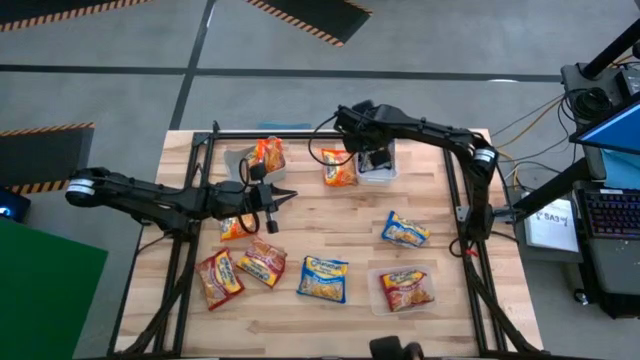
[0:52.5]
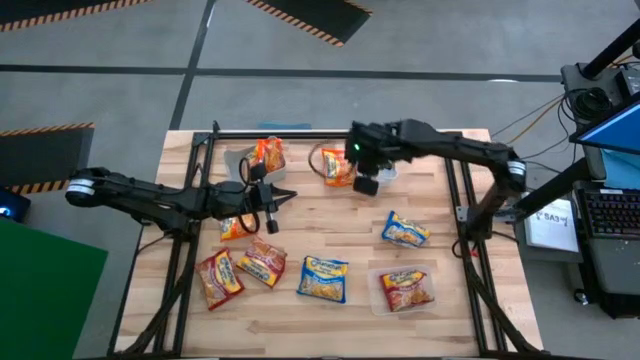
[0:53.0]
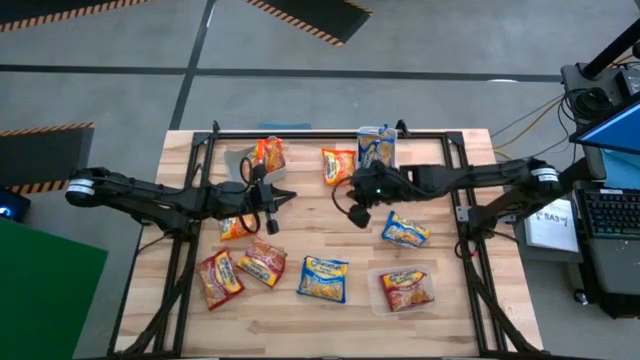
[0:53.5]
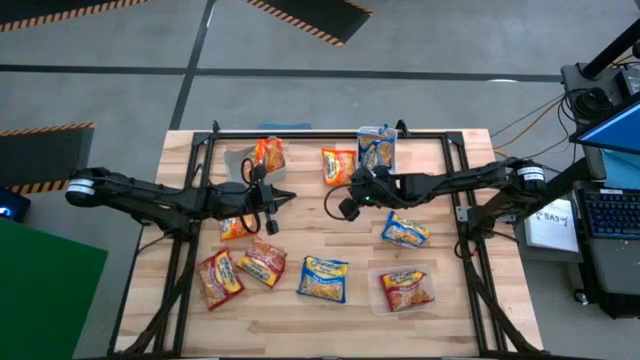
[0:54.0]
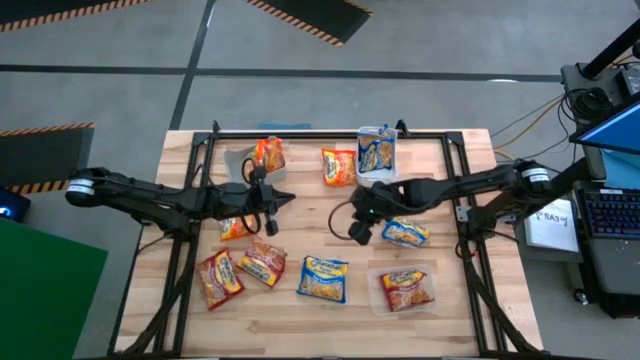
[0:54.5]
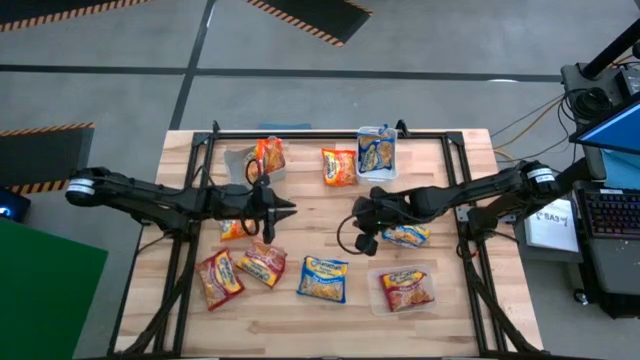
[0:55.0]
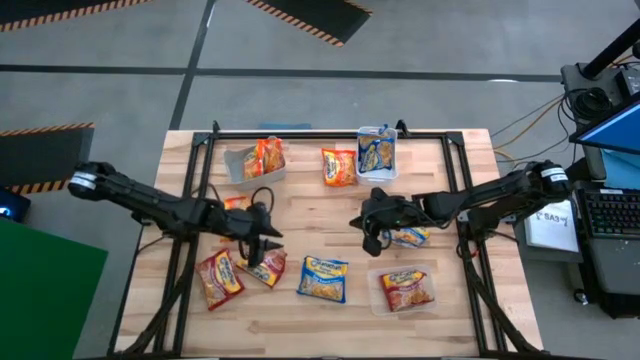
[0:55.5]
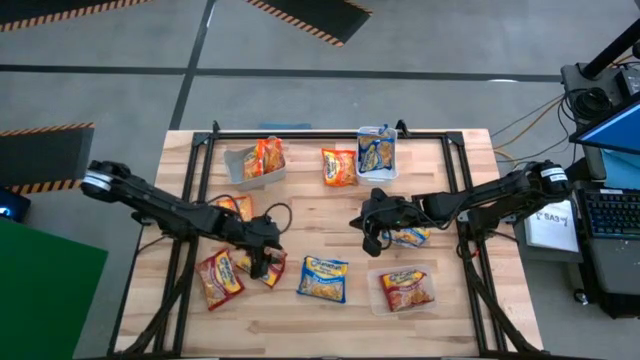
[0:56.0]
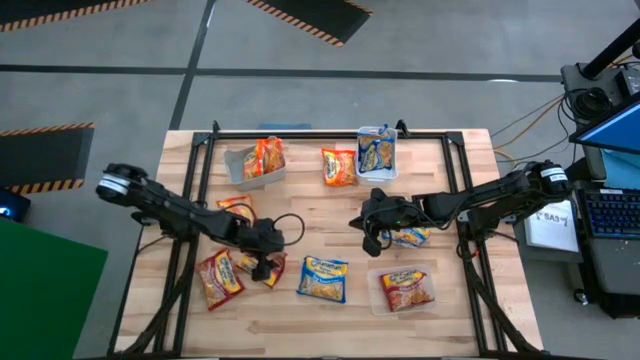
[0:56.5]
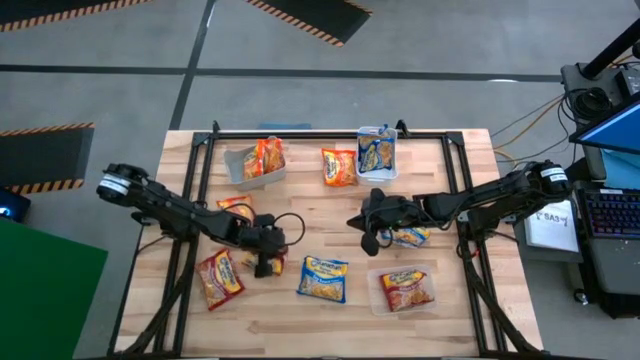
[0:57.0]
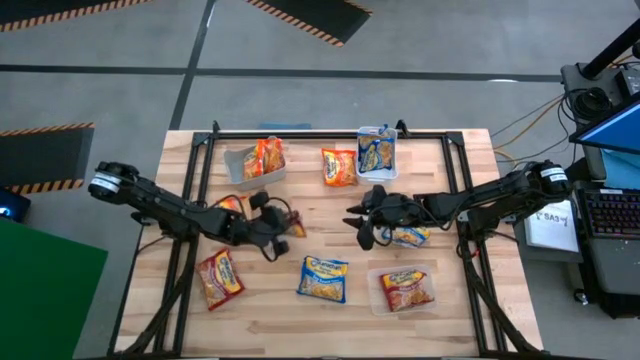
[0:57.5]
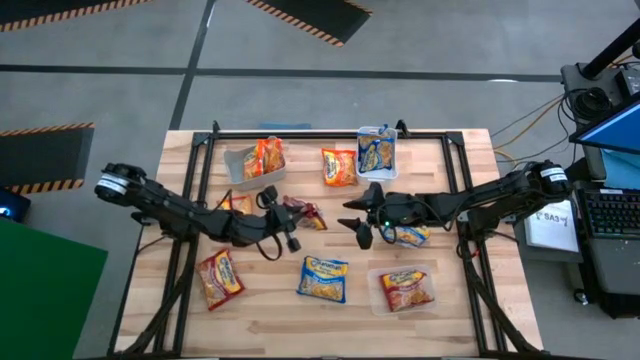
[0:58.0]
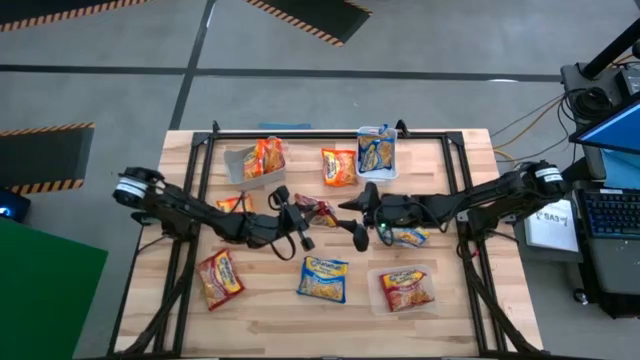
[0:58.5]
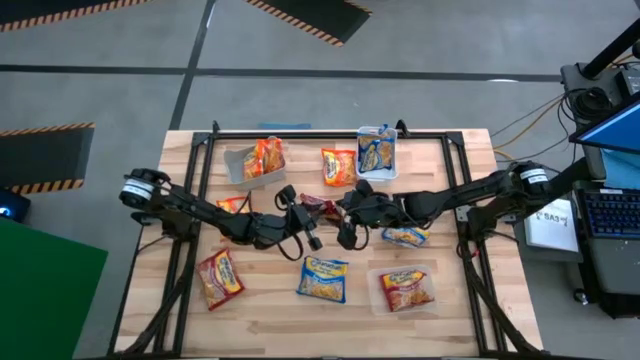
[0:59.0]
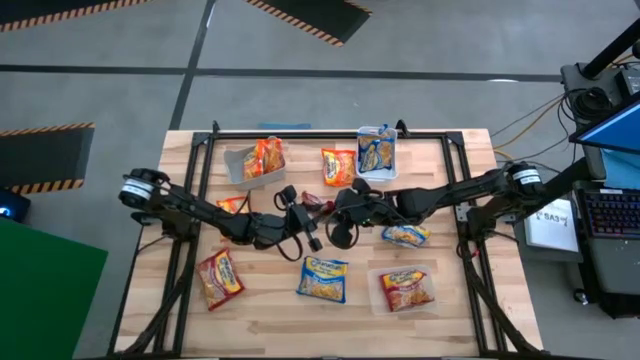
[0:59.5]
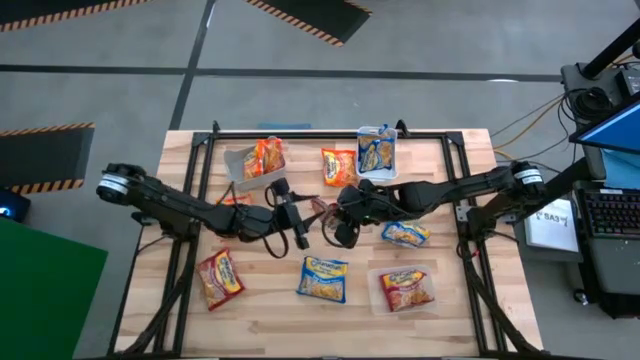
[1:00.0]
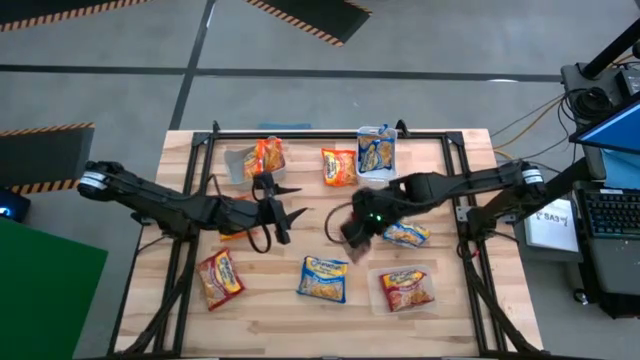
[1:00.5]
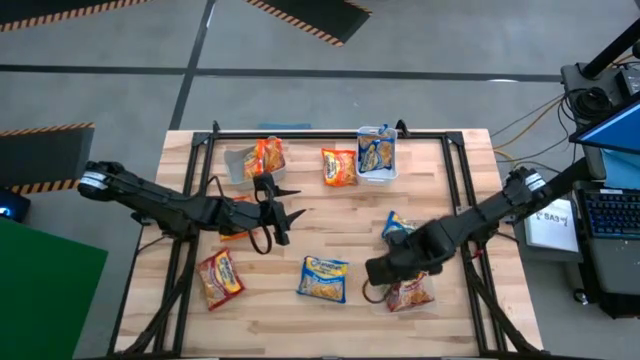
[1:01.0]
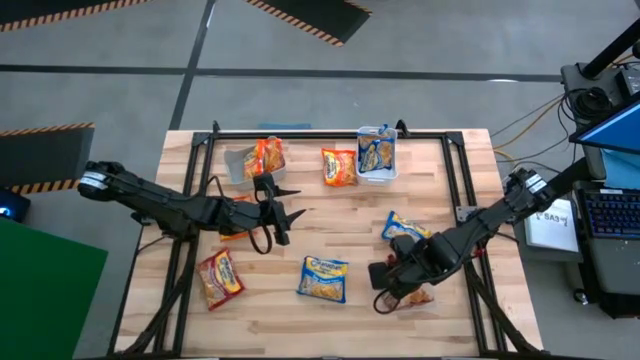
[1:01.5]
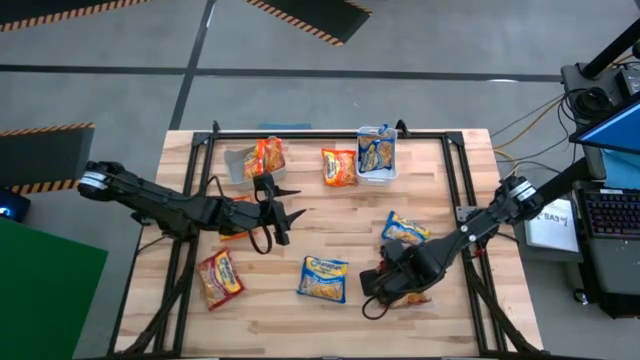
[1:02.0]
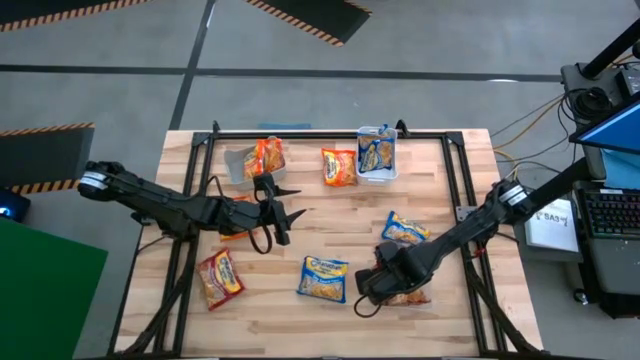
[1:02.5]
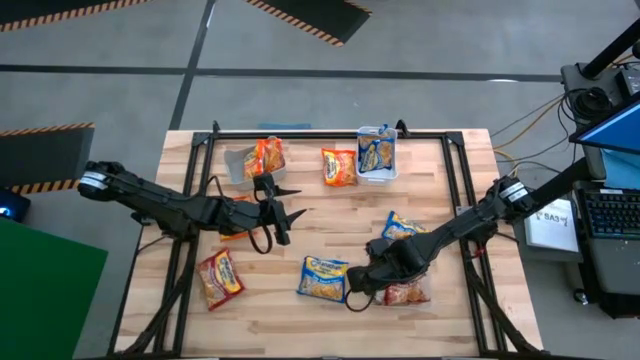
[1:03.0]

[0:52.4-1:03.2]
Task: Sort Maruchan noodles
Put the red noodle pack into the transparent bin

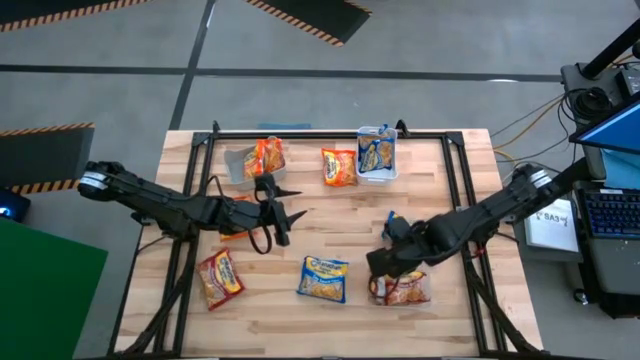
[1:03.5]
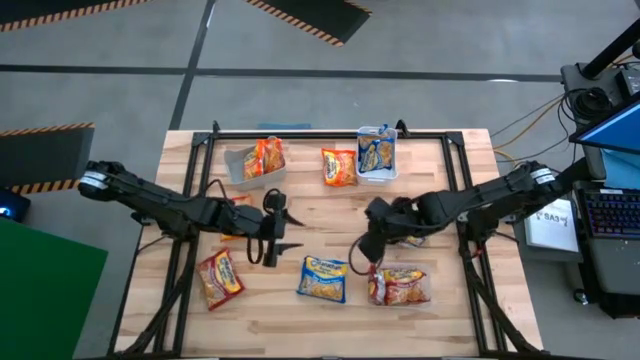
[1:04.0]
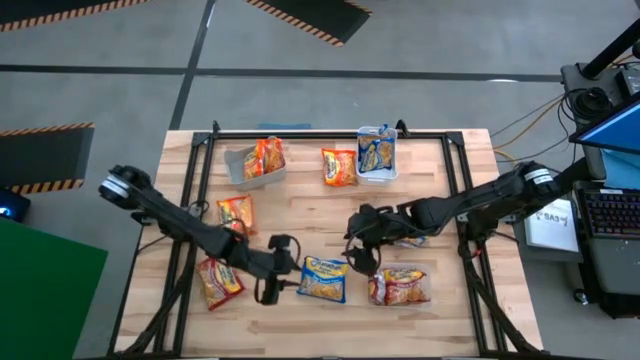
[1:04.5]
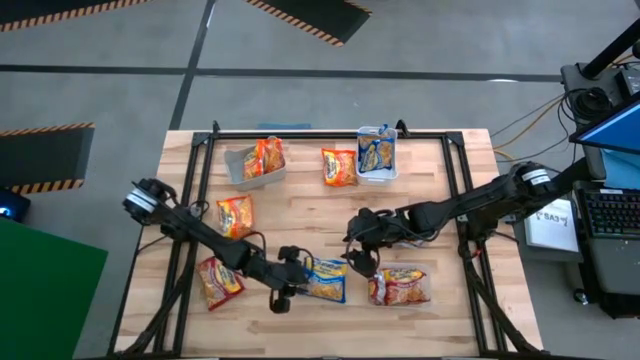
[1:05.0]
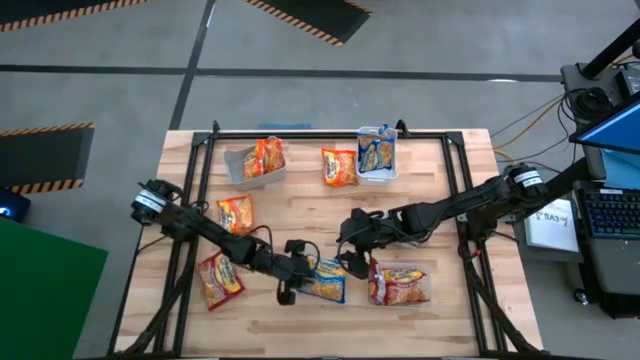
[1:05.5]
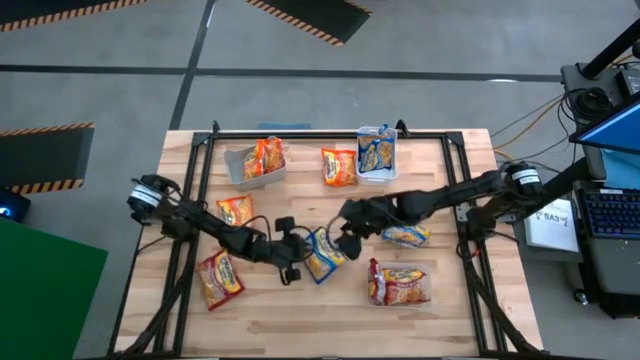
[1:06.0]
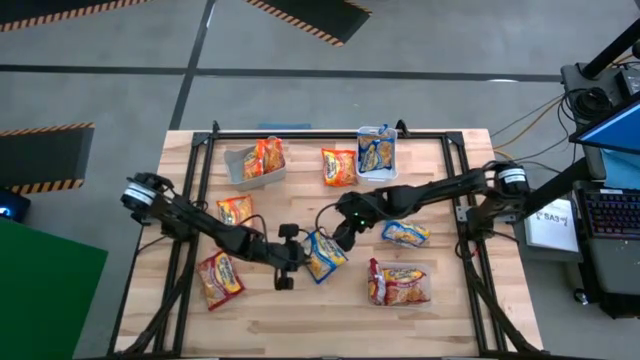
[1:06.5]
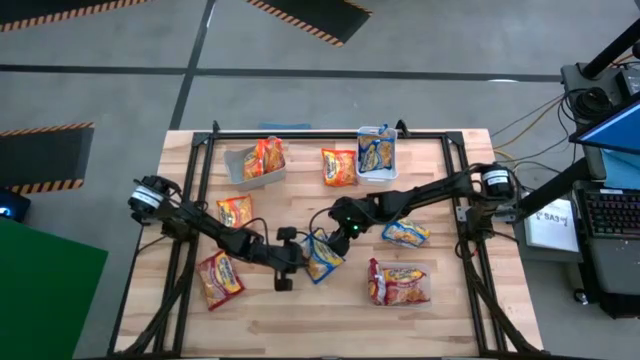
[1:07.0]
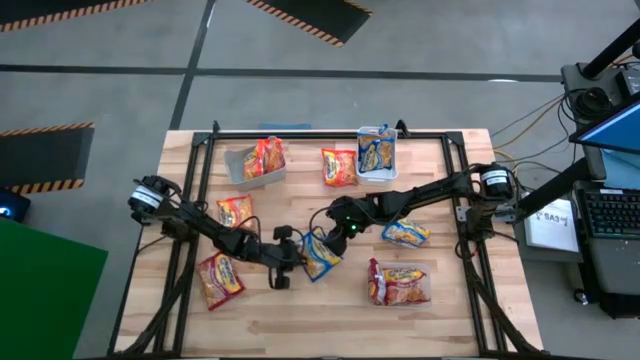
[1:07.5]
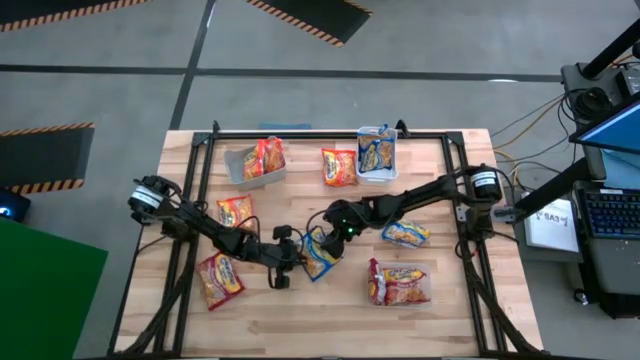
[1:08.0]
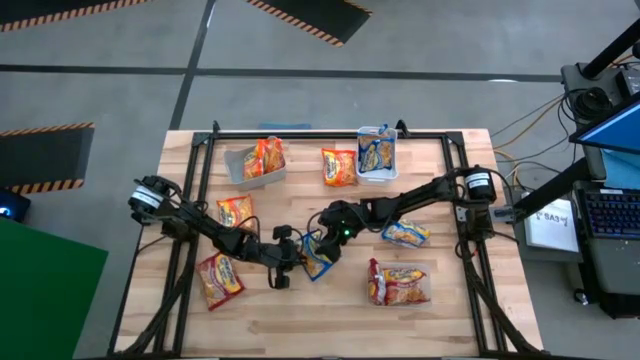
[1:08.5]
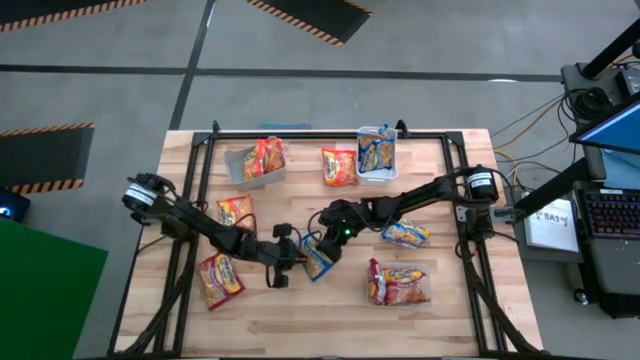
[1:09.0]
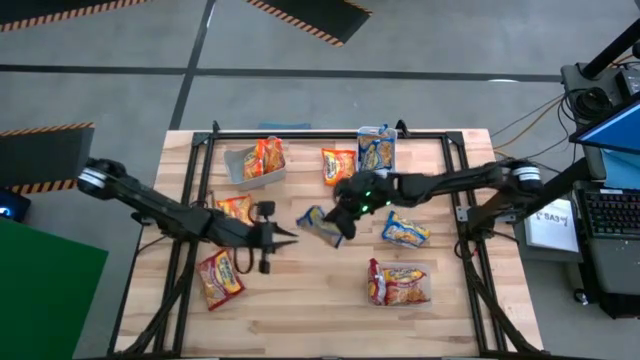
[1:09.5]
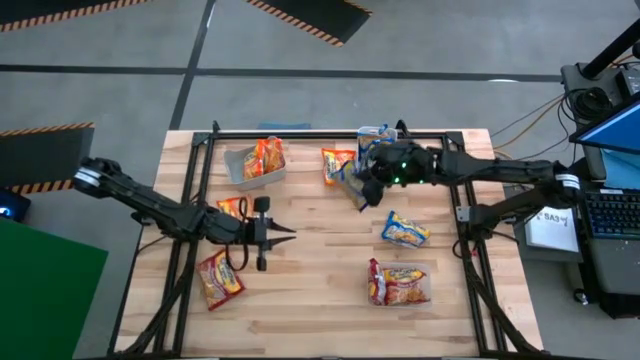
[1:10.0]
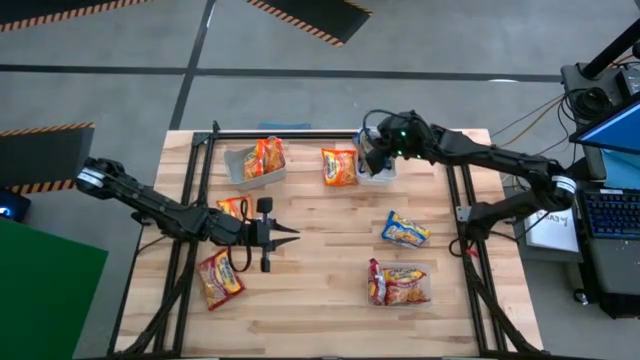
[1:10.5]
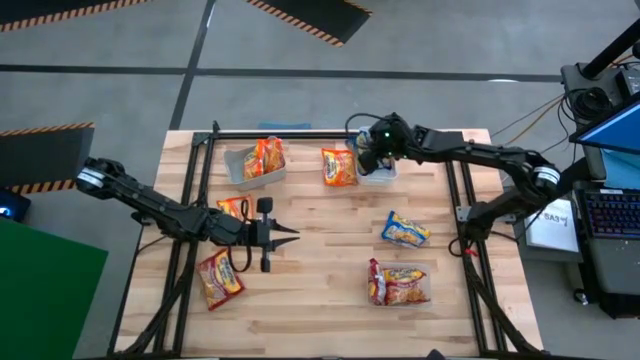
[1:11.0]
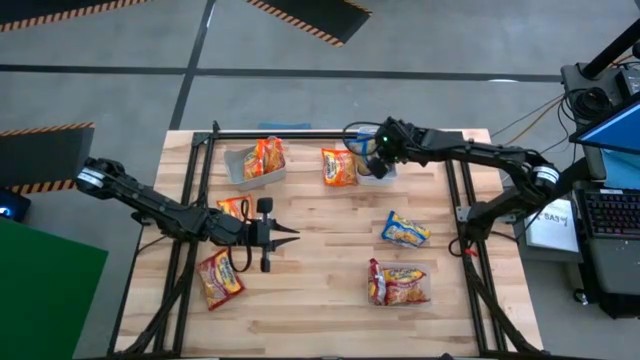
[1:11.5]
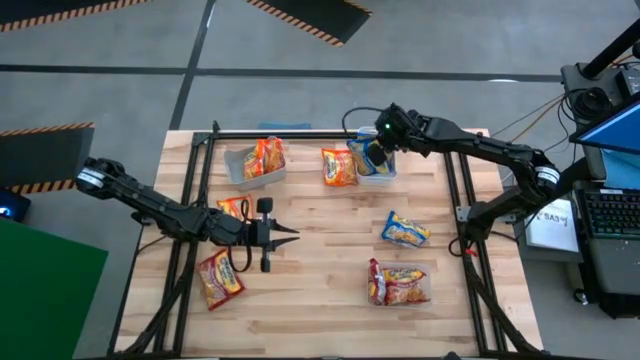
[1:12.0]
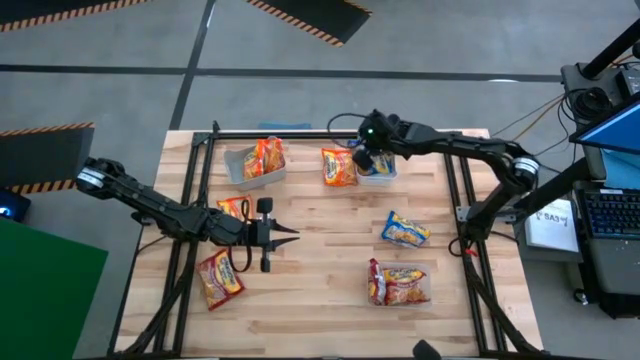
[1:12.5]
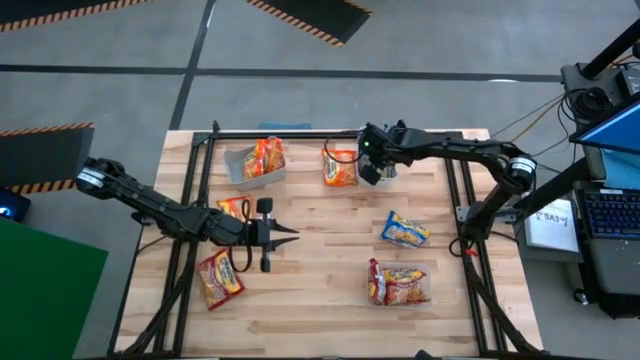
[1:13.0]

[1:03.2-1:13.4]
Put the blue noodle pack into the white bin

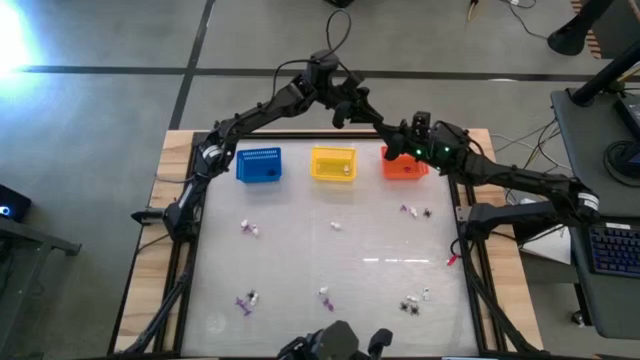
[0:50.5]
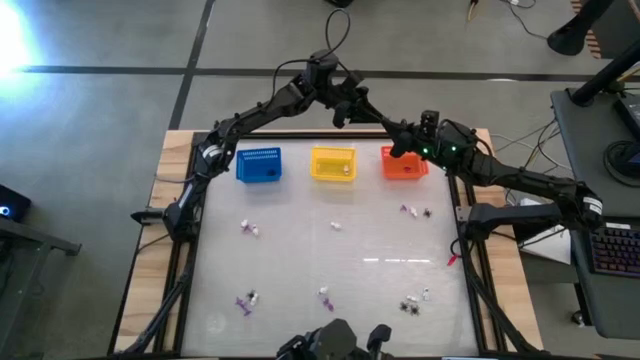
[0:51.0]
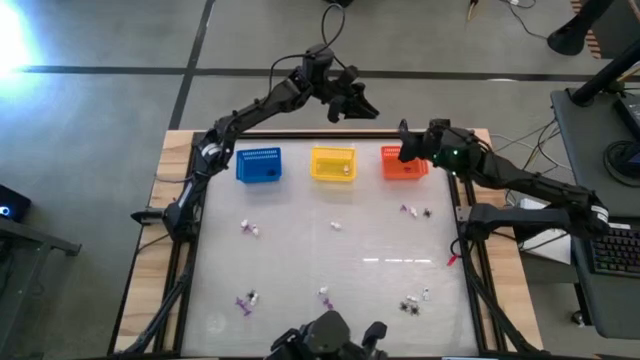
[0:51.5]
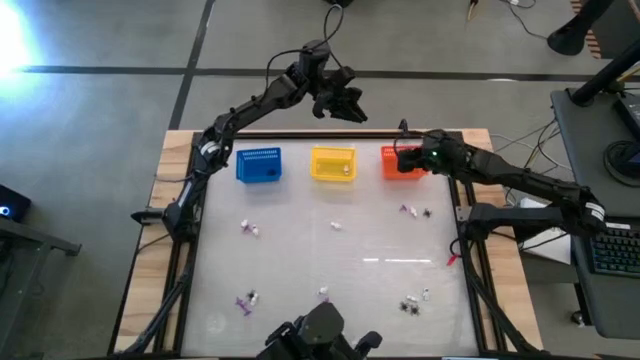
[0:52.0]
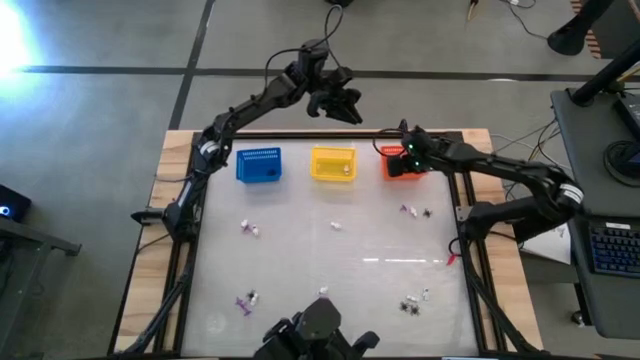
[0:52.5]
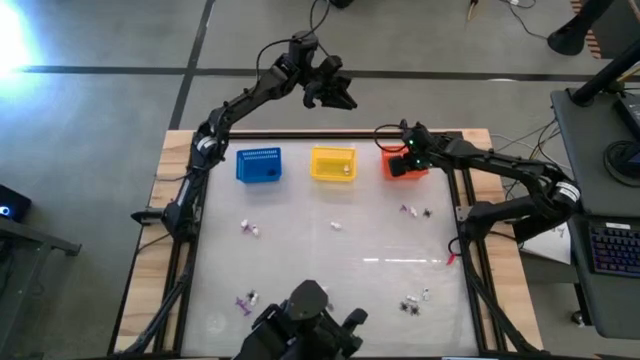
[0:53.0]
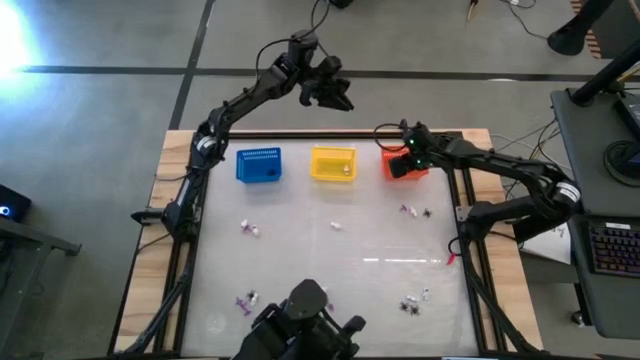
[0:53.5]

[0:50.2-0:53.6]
Task: Sort Halloween decoration
Put the black spider toy into the blue bin
